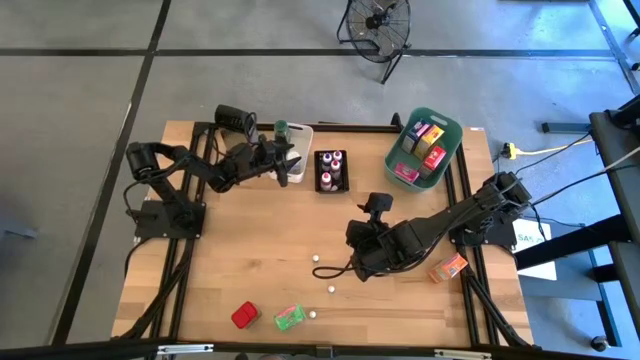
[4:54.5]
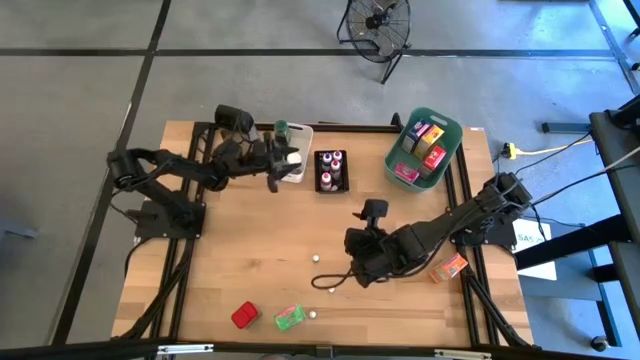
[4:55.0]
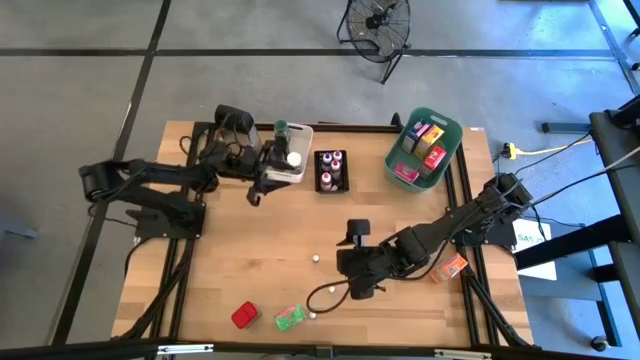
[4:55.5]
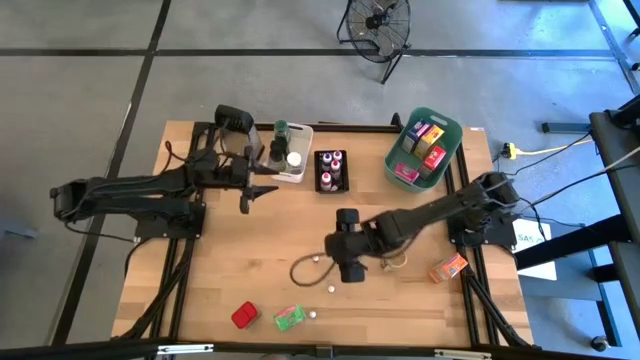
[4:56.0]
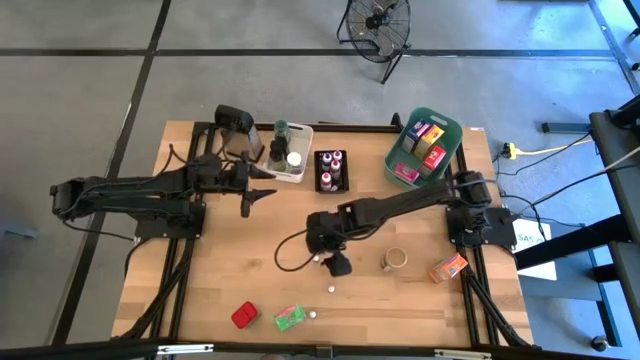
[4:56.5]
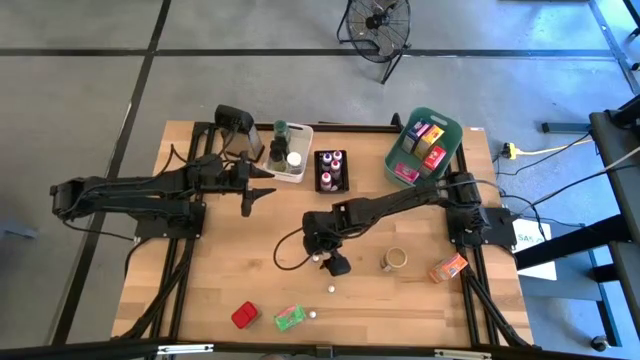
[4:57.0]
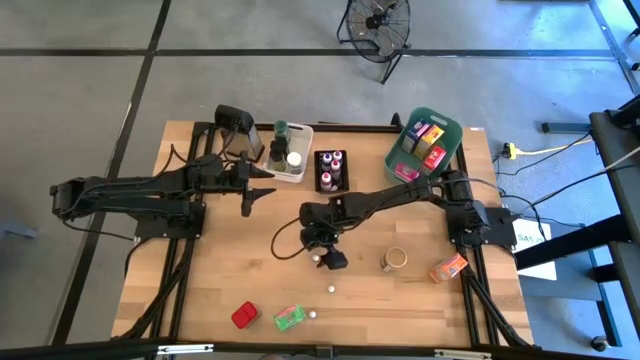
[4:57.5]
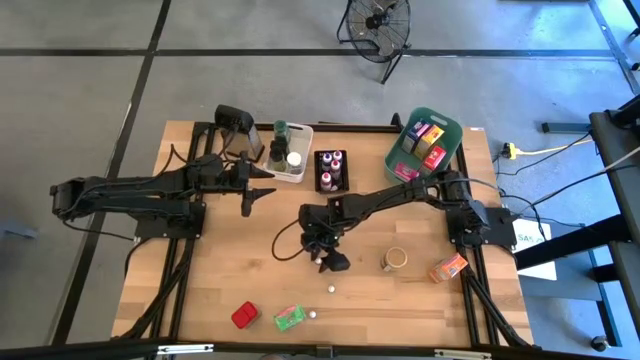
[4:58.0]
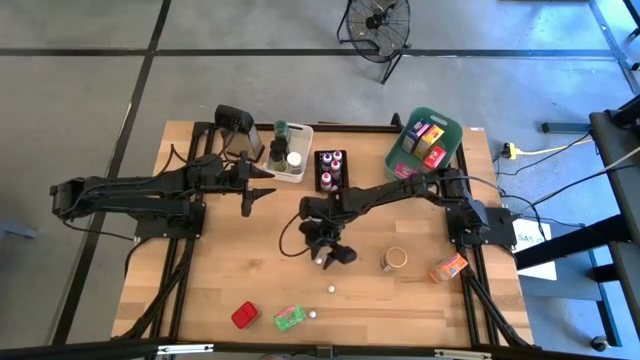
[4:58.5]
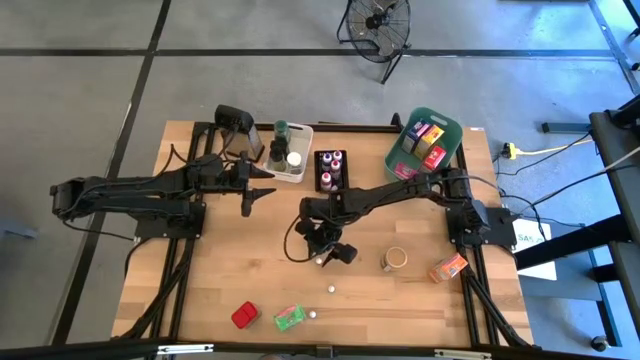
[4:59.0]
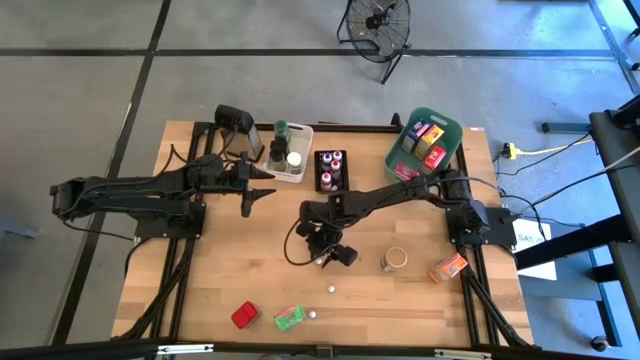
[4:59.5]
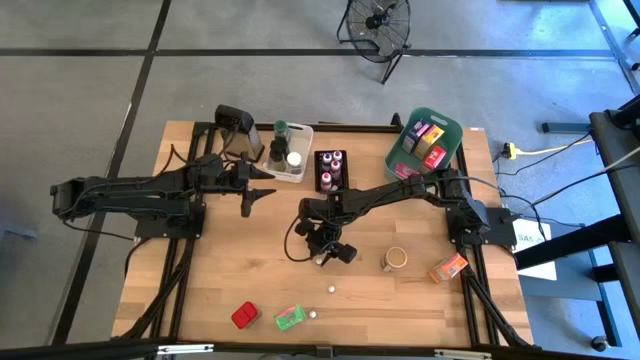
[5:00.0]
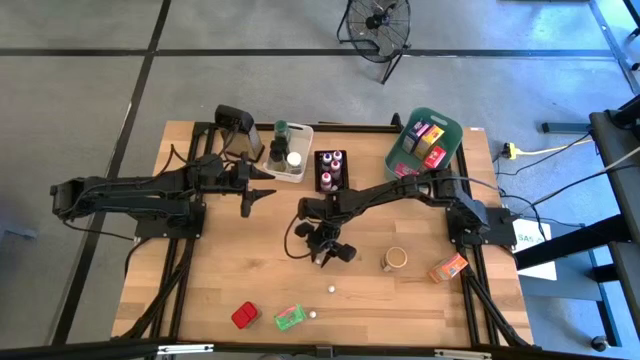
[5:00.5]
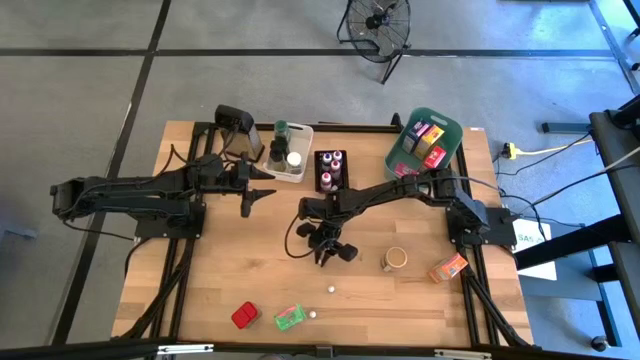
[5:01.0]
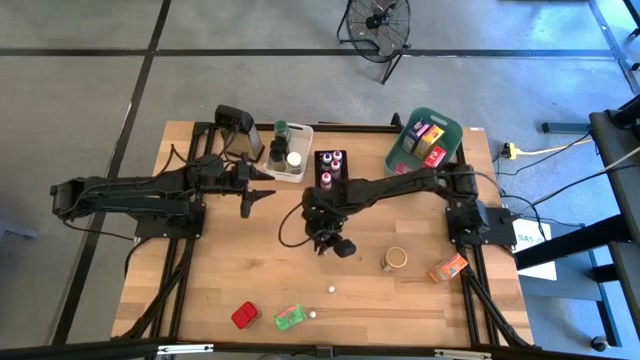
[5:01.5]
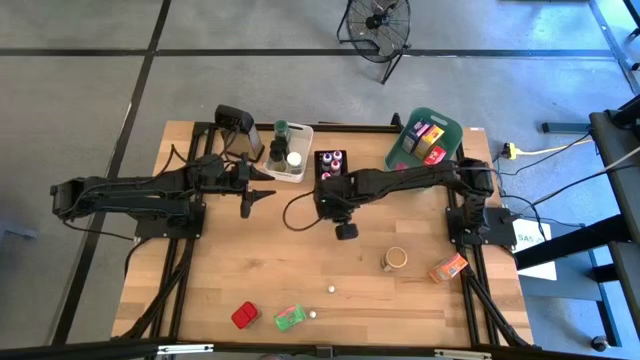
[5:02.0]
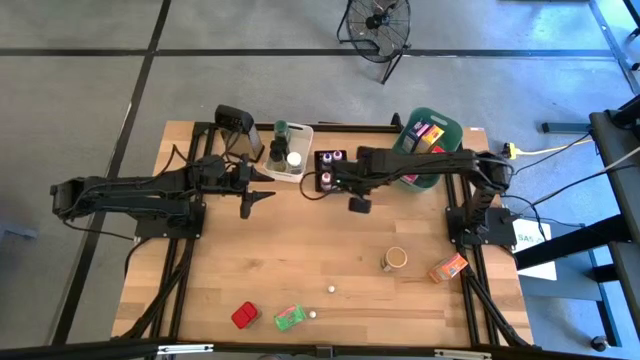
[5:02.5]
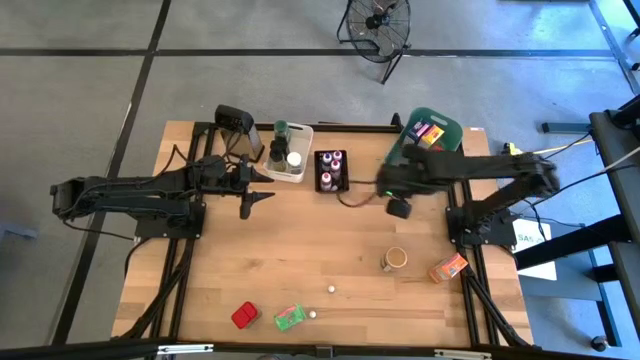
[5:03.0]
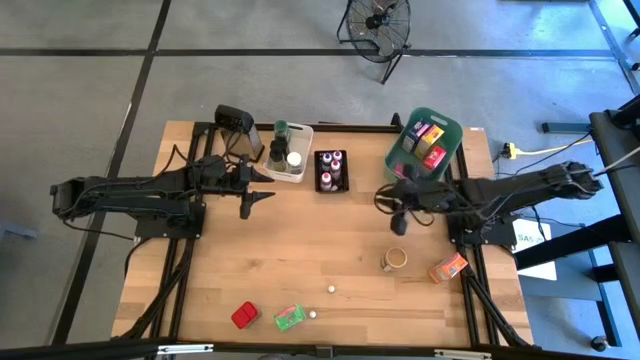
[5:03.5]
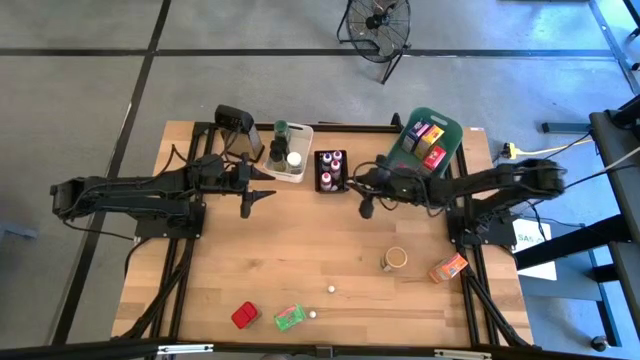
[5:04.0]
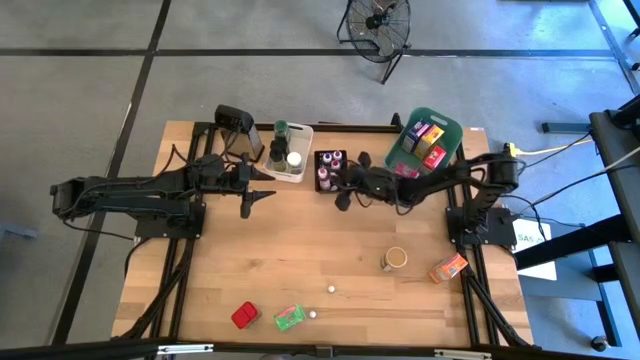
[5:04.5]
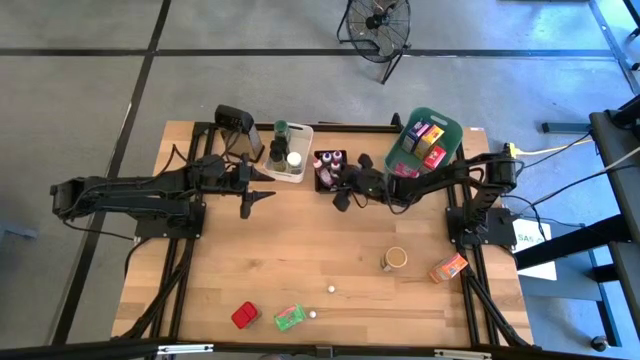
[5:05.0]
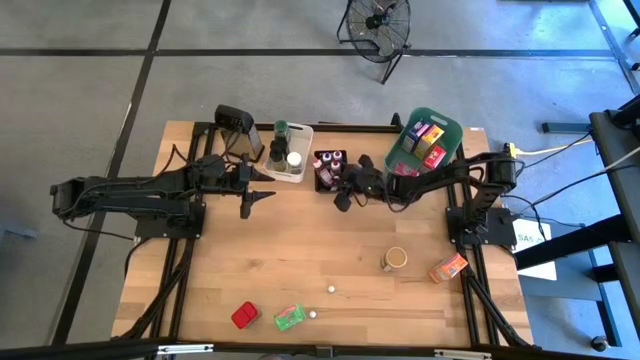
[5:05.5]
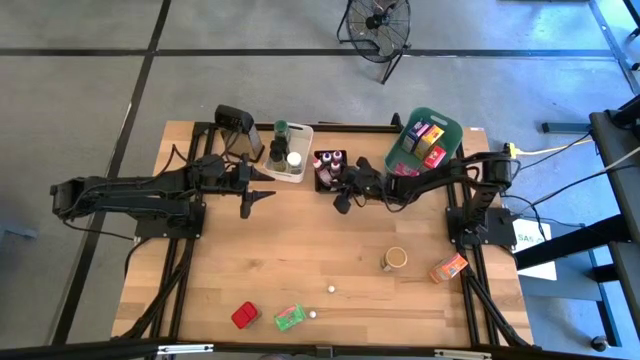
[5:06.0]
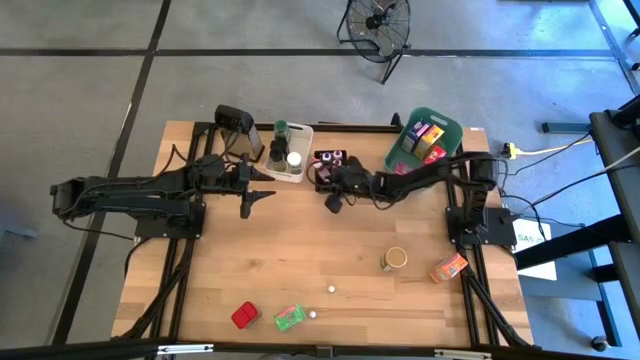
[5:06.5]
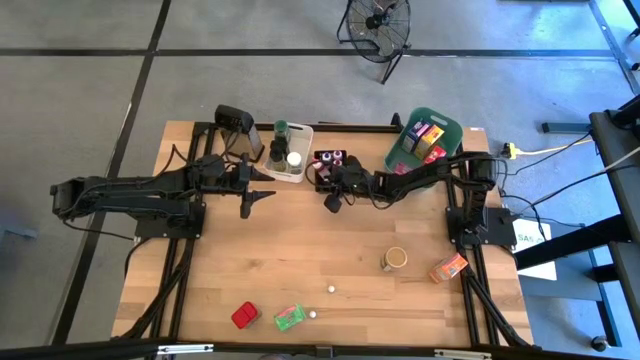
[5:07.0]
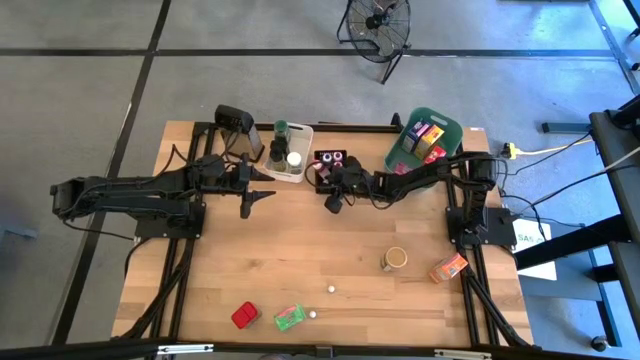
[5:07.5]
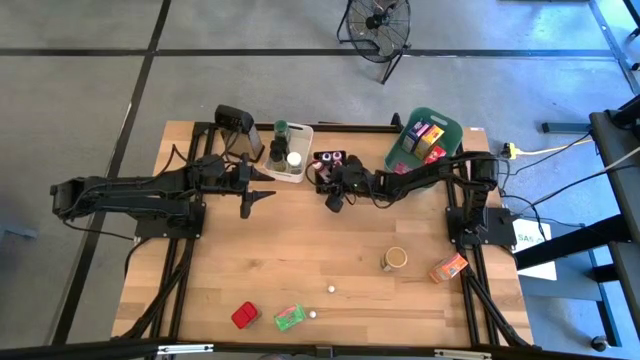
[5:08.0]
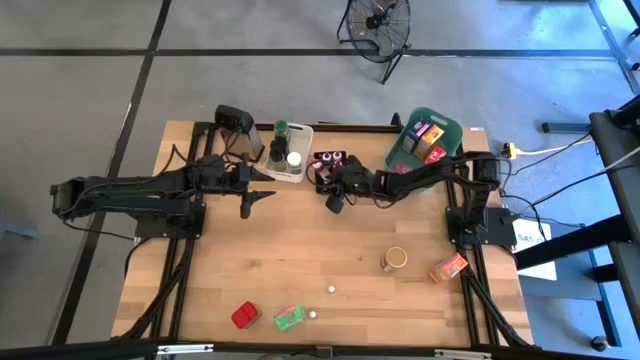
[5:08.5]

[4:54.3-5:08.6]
Task: Pick & Place Kitchen Items
Put the small purple food coloring bottle into the black bin

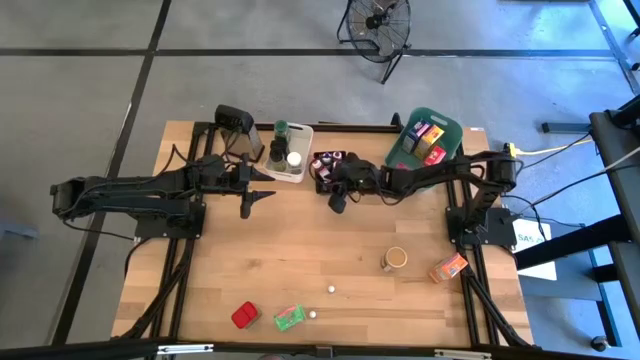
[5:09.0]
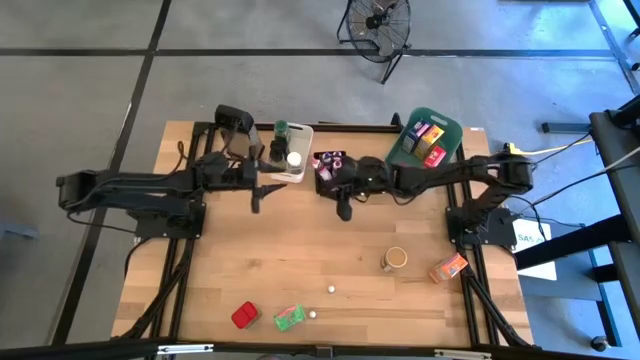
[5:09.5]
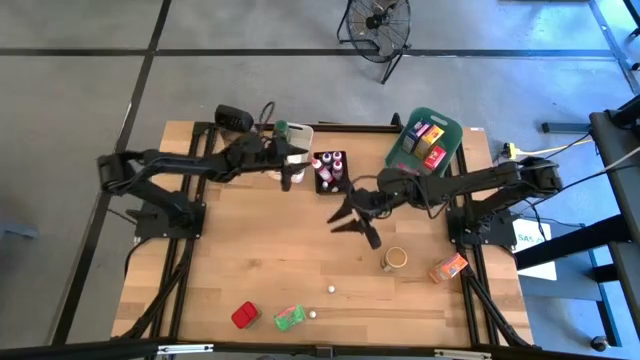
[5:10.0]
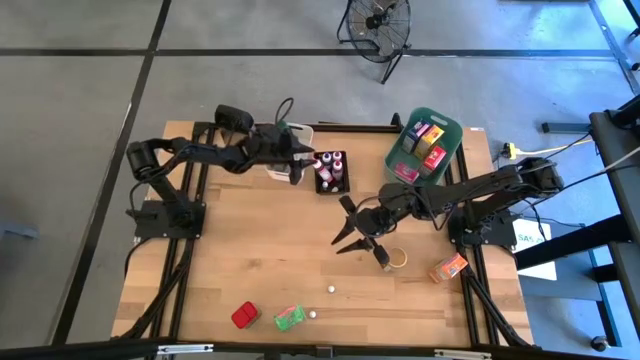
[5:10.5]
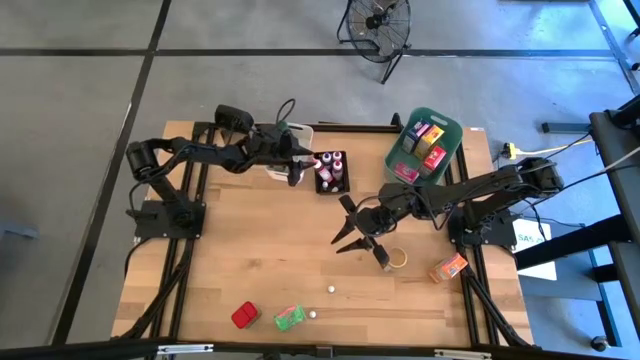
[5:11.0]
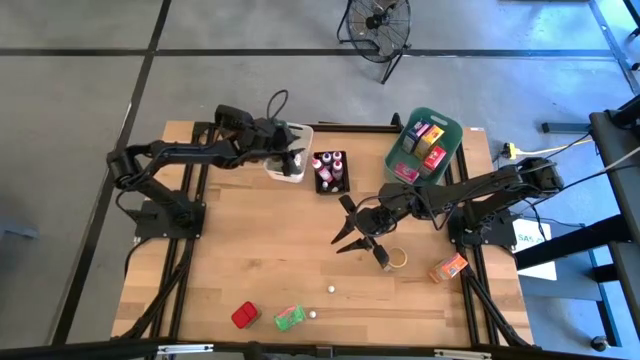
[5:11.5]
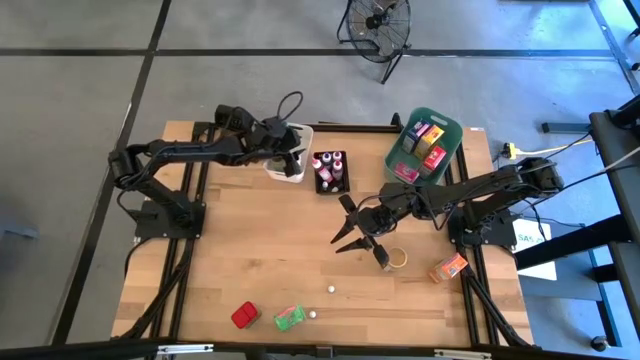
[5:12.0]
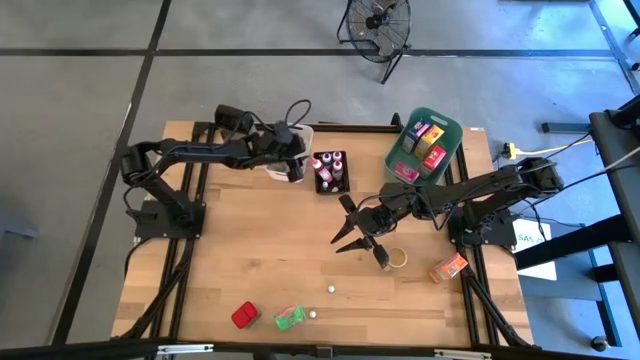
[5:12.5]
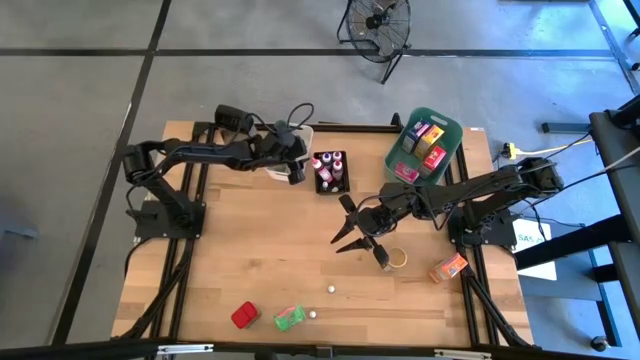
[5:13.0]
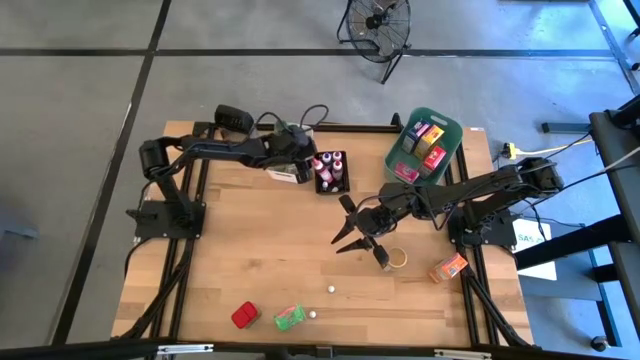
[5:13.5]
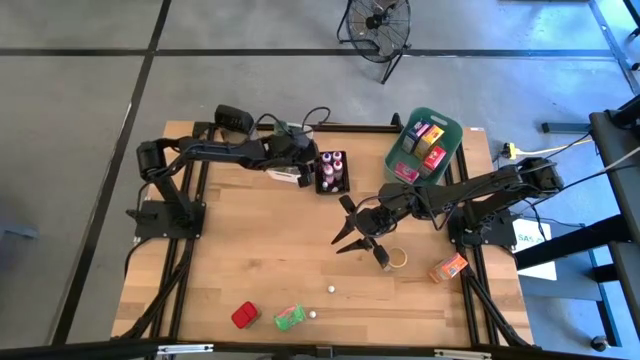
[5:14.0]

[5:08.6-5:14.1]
Adjust the large pink food coloring bottle

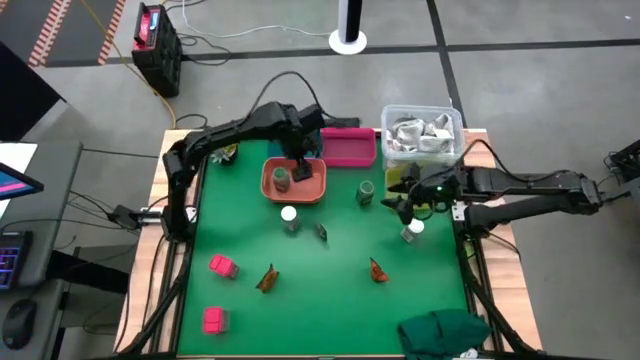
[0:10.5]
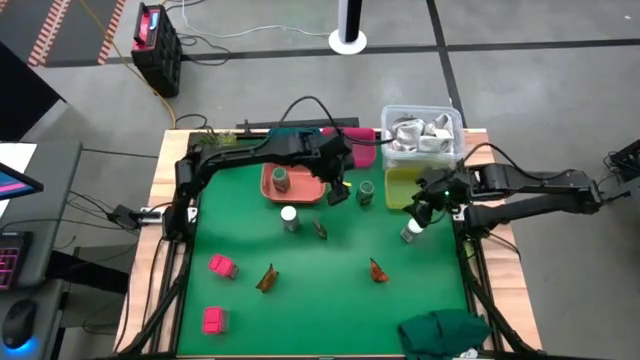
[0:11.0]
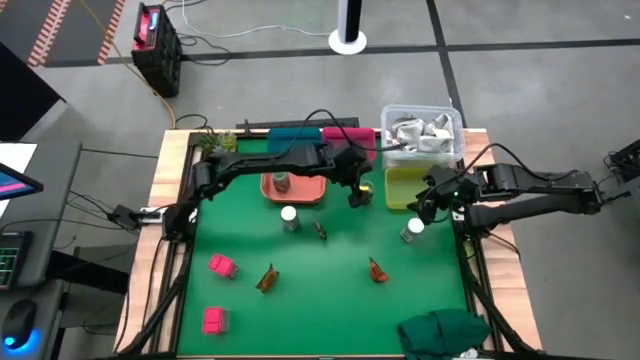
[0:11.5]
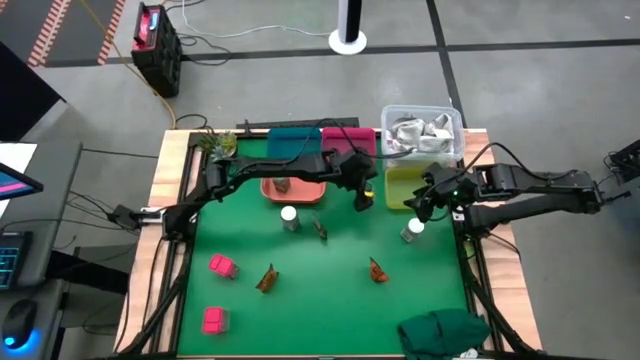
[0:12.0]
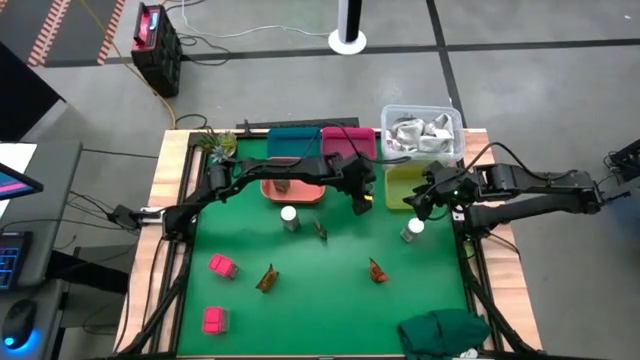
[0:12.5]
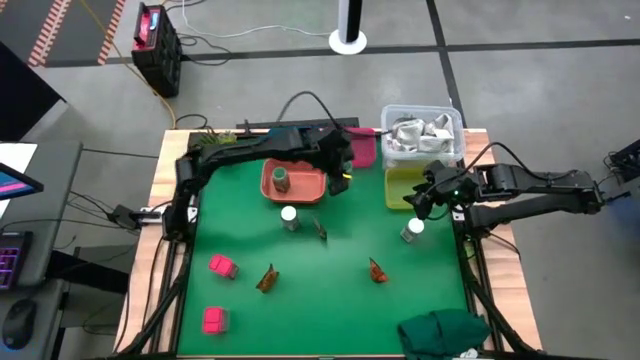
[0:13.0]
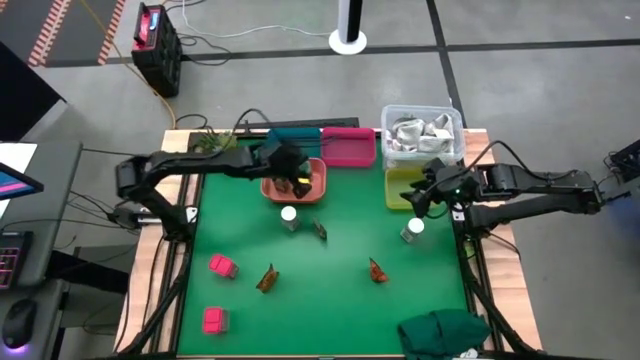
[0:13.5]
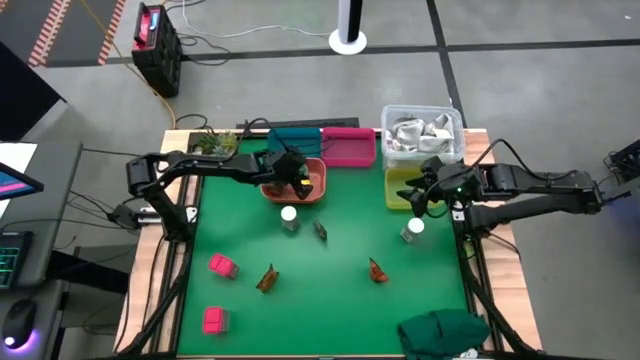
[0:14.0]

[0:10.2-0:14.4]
Task: Sort spices by type
Put the green seasoning bottle into the orange bin
